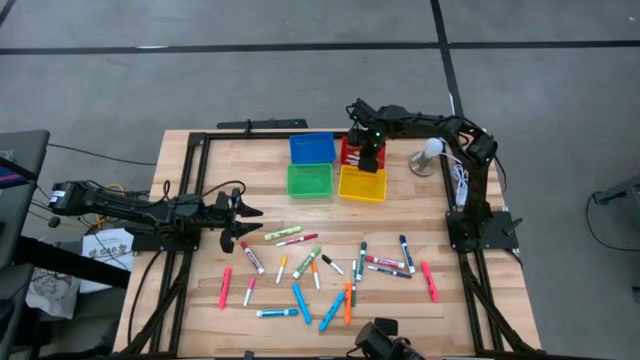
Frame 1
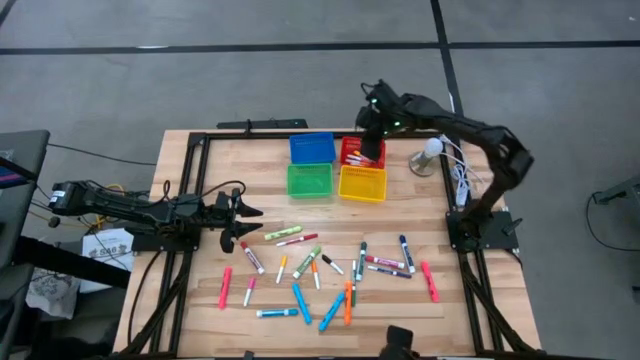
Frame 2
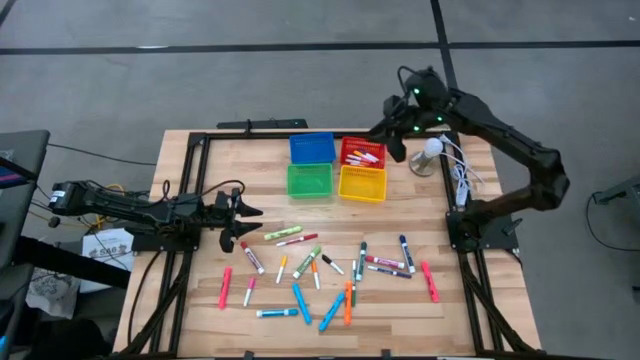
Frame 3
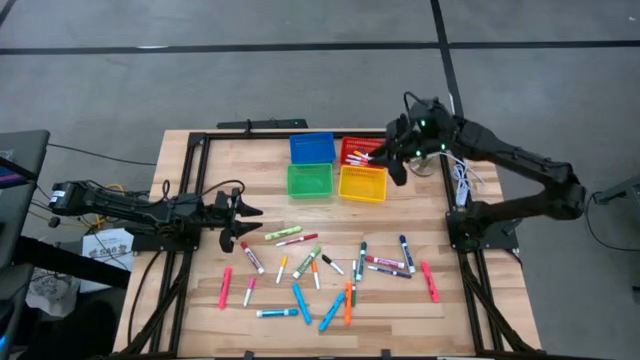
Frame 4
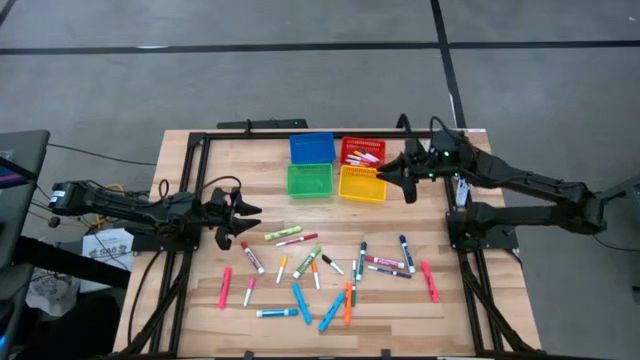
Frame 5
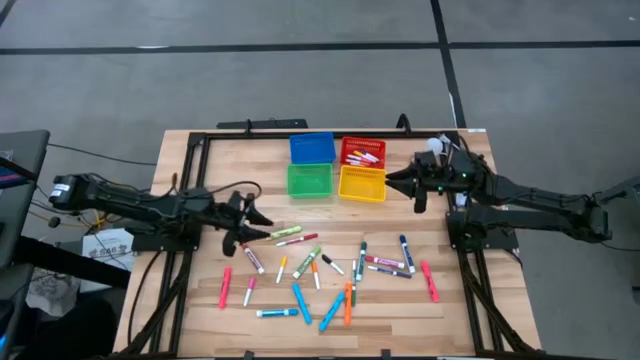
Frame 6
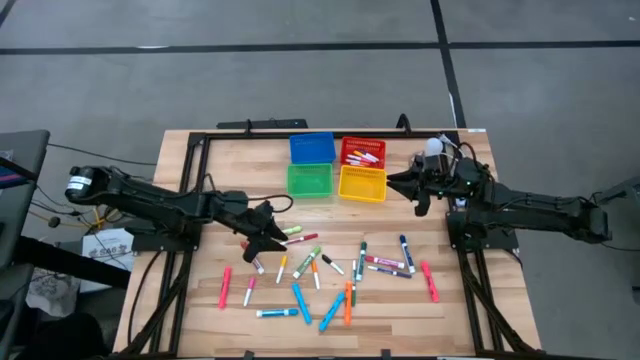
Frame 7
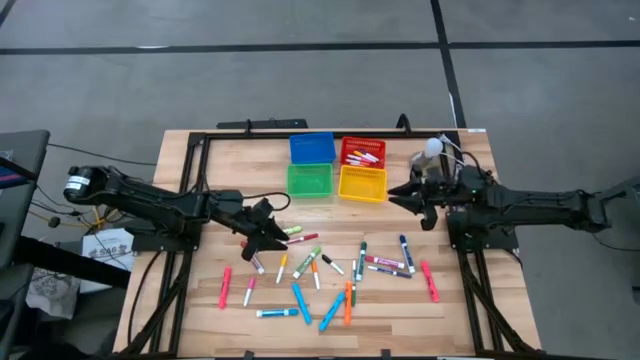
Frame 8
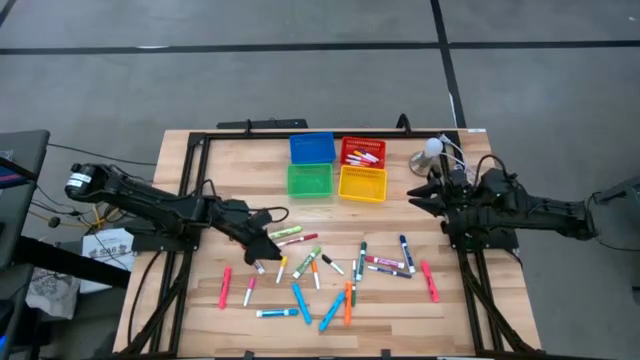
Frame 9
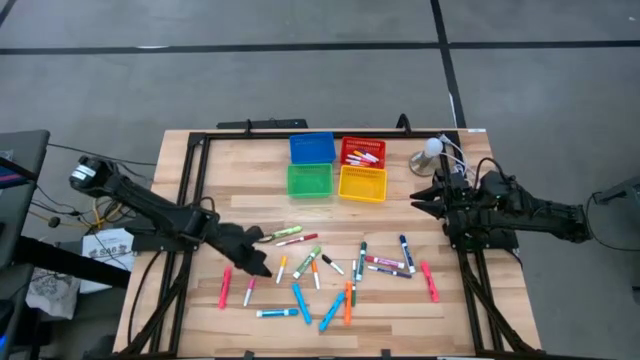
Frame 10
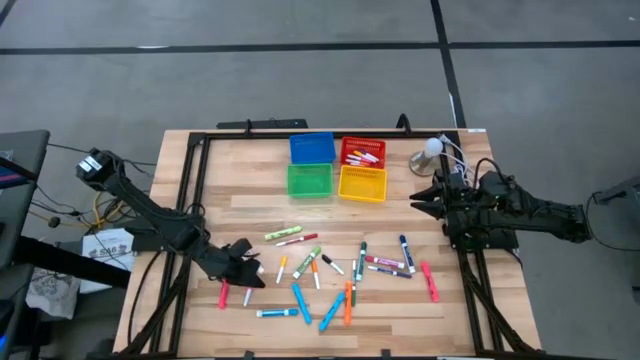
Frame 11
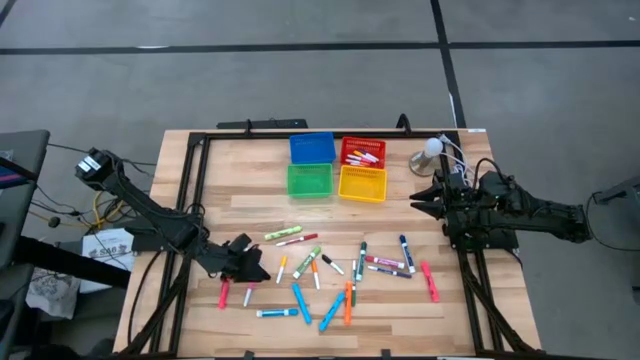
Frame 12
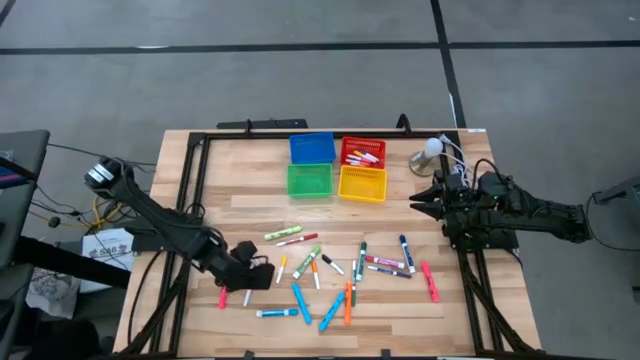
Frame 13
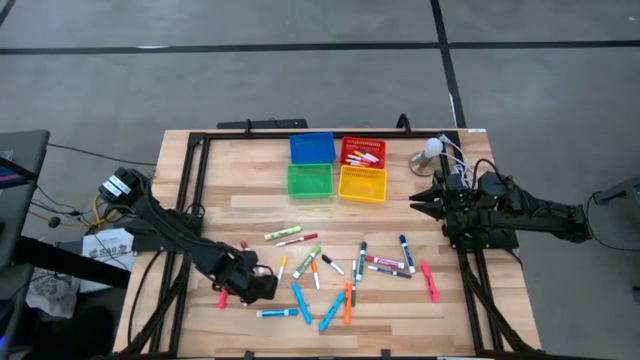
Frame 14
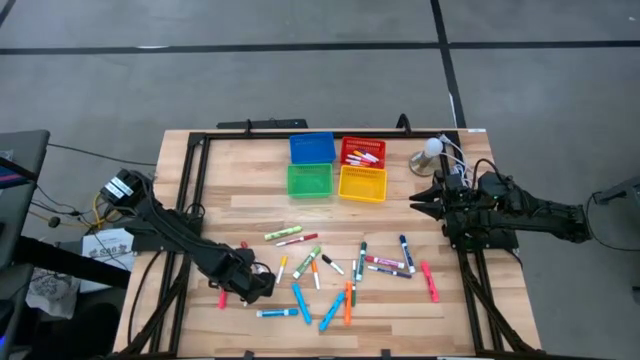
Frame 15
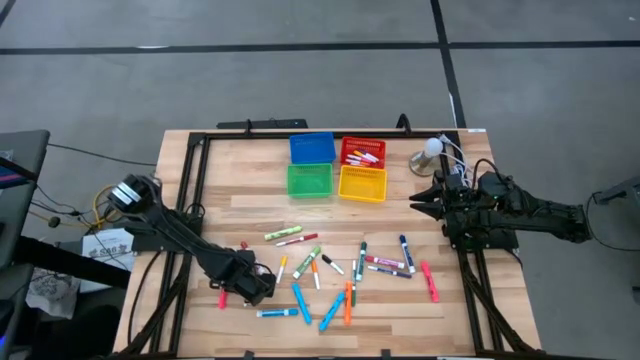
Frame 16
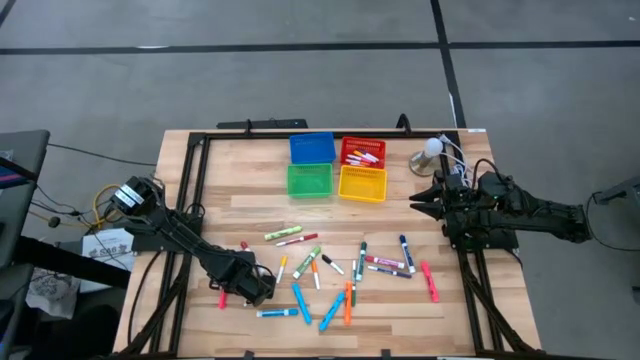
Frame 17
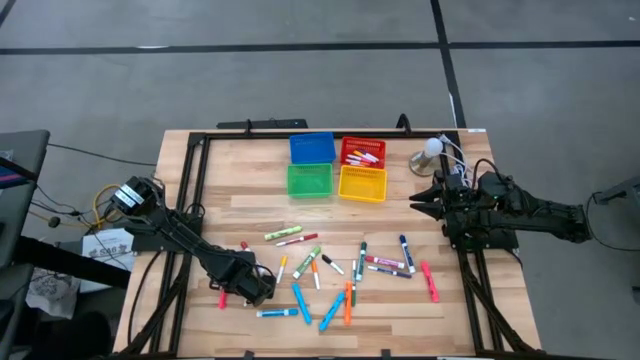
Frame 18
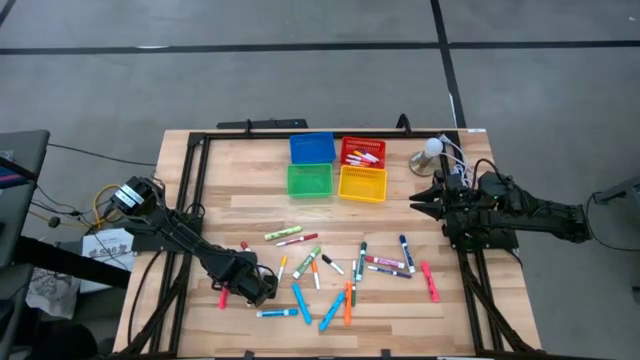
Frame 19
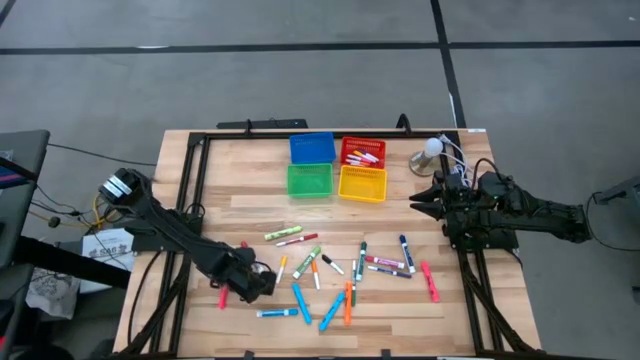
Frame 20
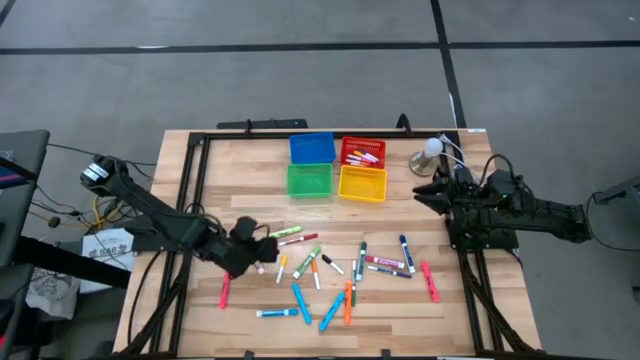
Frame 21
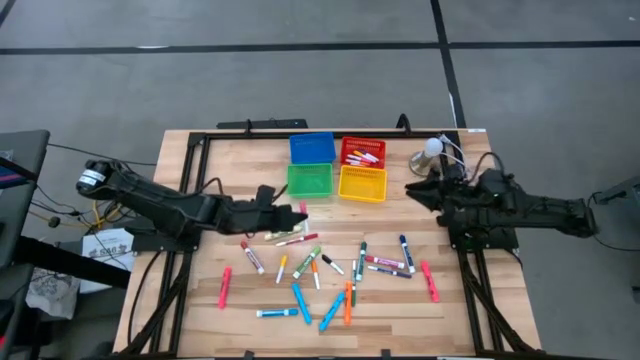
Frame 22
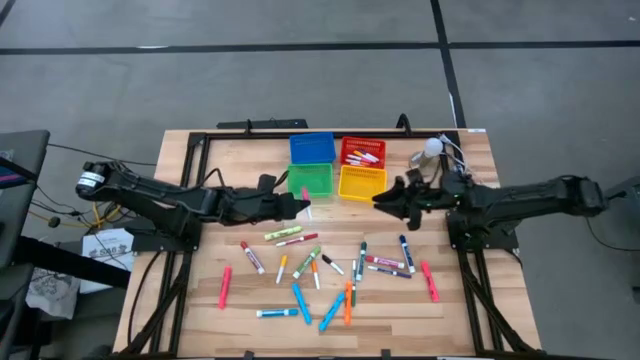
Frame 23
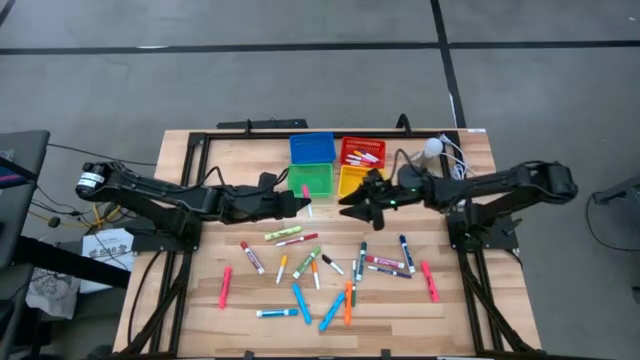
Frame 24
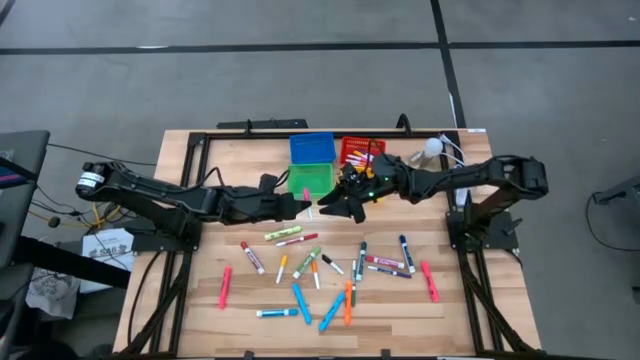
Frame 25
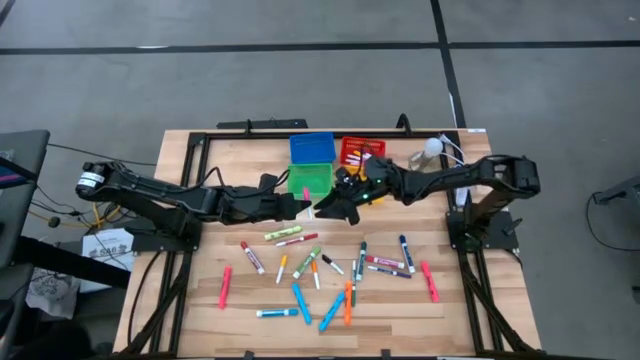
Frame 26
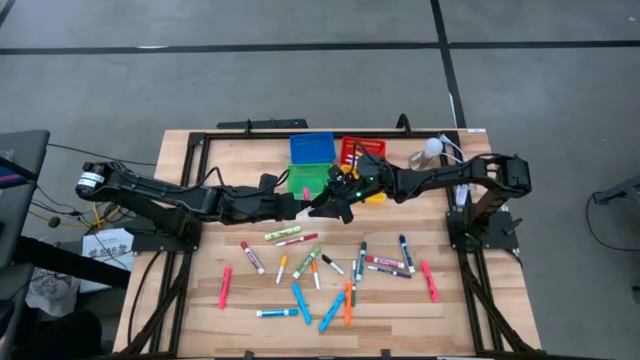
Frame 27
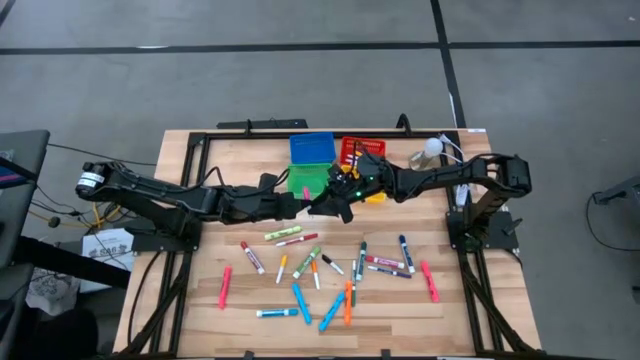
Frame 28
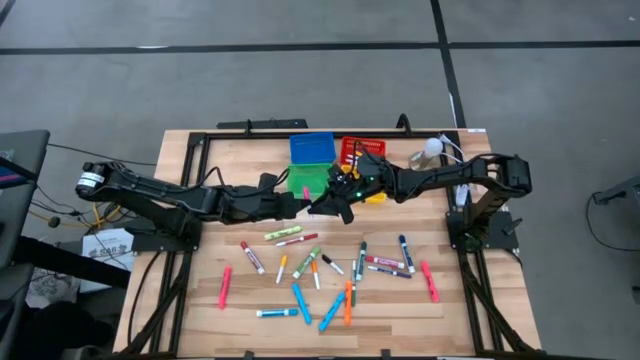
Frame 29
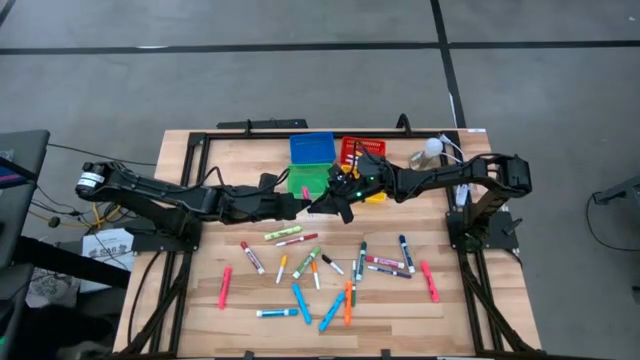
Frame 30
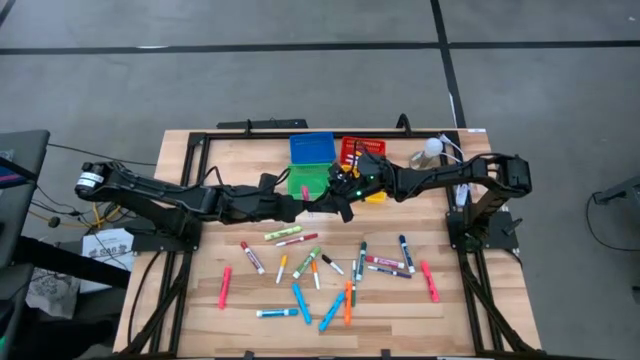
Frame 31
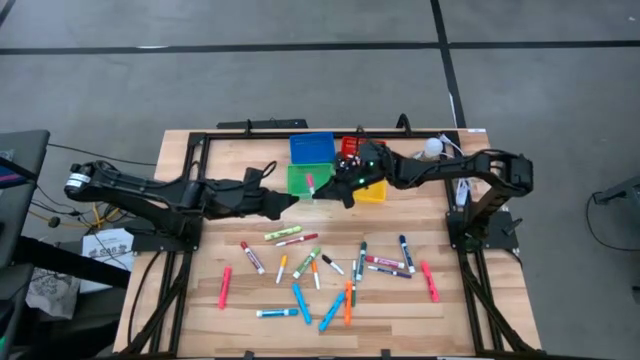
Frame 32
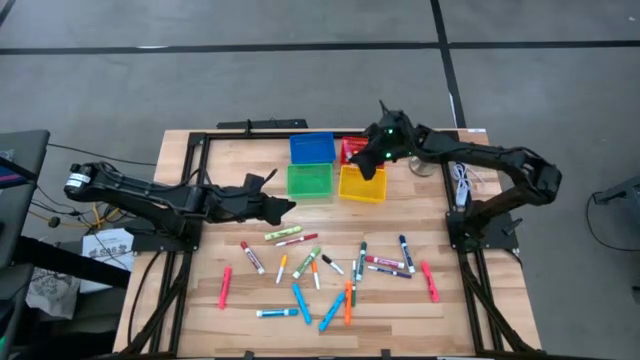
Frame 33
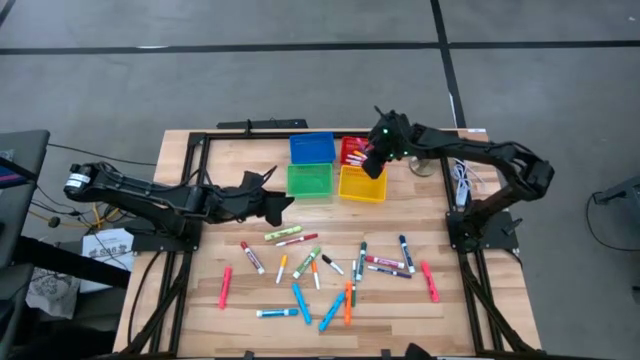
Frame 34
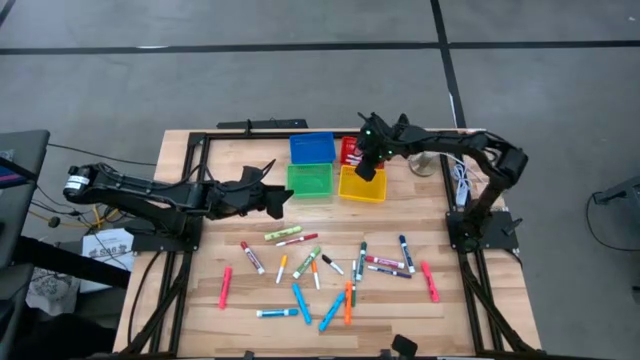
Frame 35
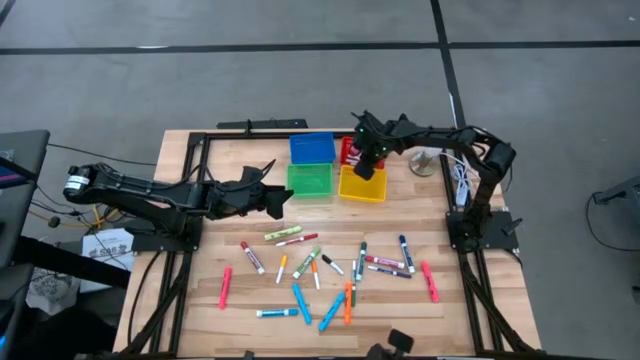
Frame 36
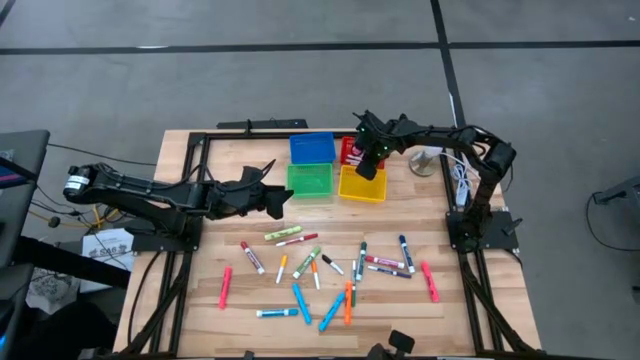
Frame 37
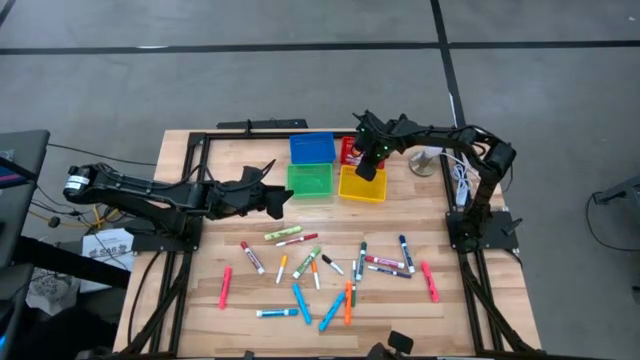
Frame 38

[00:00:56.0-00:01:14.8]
Task: Pick & Place Markers
Put the pink highlighter into the red bin

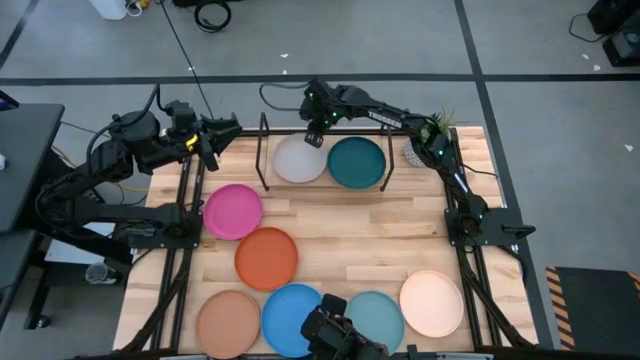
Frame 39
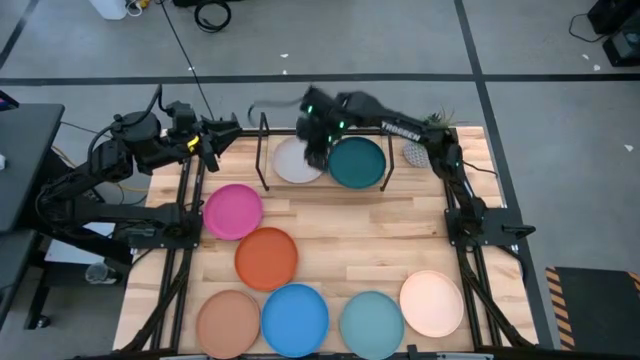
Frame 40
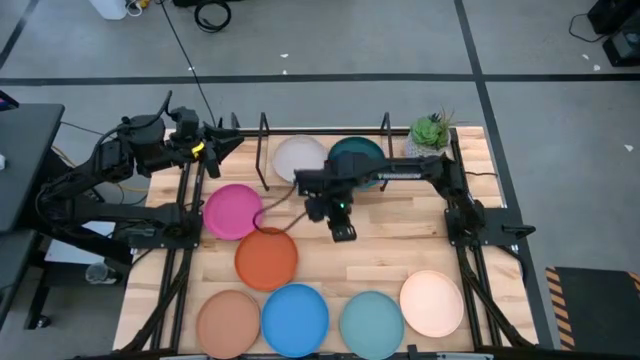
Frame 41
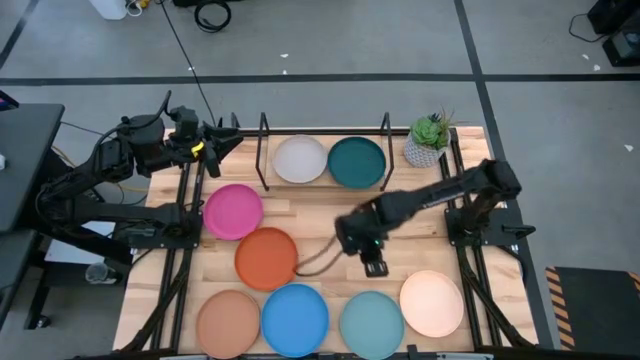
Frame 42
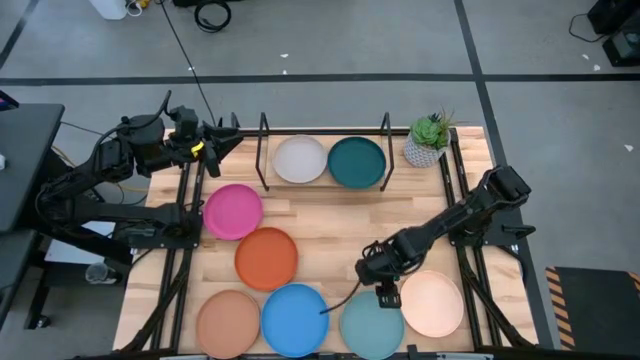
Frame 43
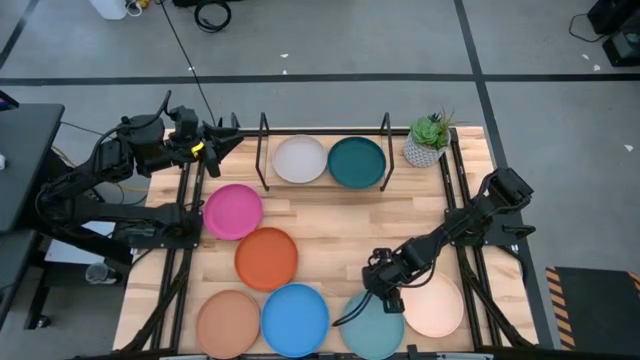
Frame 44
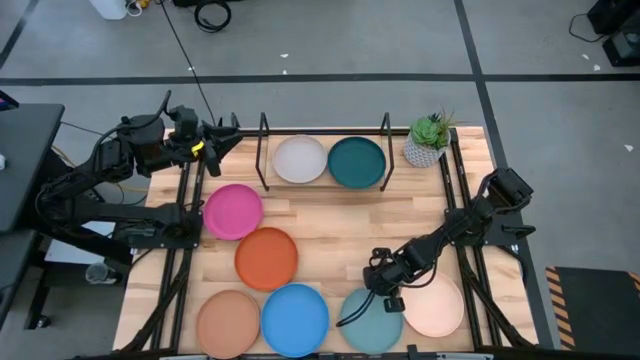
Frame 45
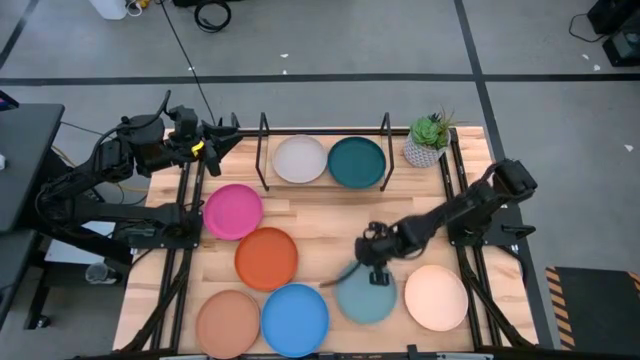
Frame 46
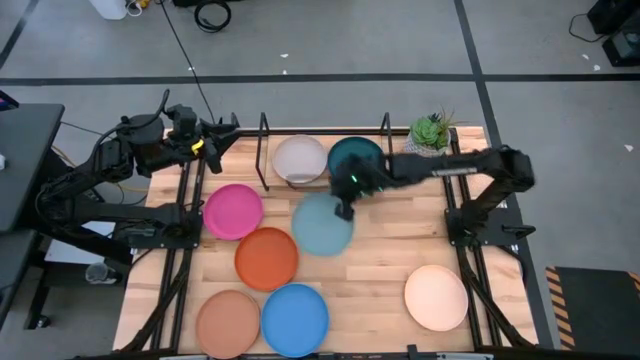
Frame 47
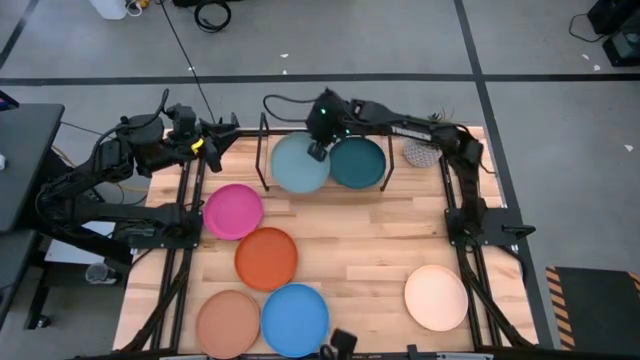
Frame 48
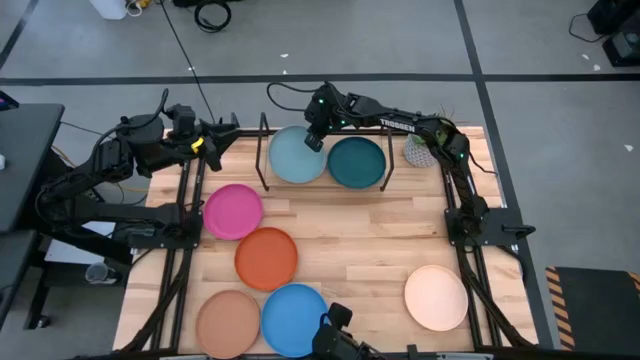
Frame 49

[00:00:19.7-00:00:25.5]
Task: Place and stack plates onto a shelf
Stack the light blue plate on top of the gray plate on the shelf
